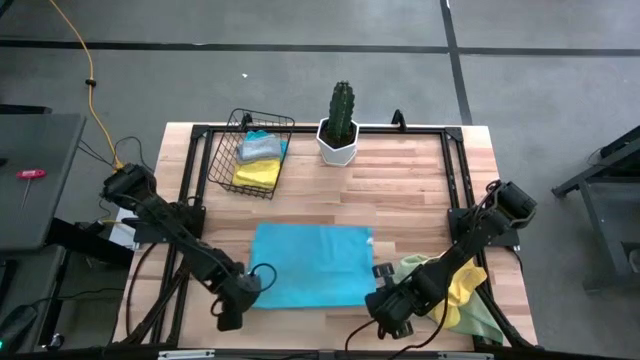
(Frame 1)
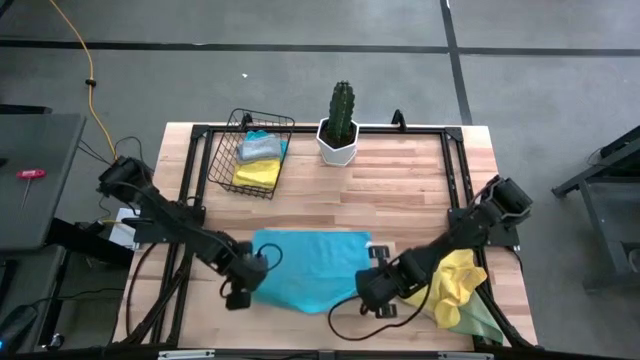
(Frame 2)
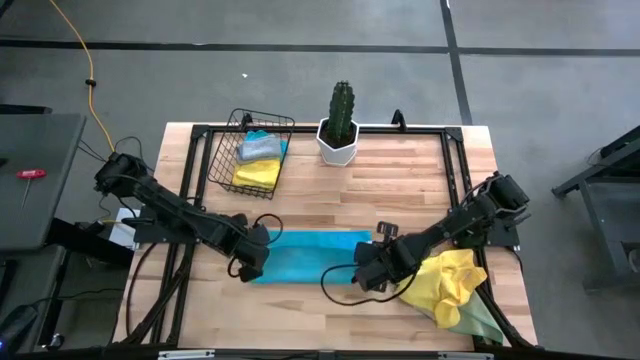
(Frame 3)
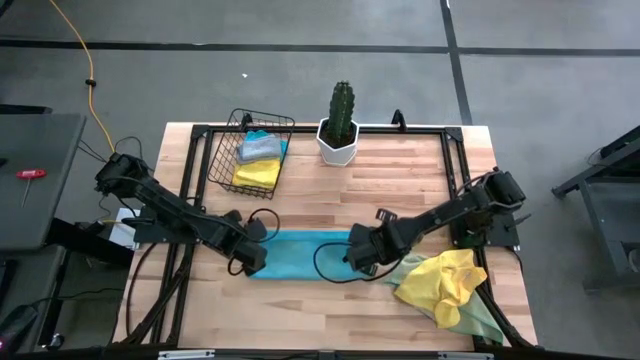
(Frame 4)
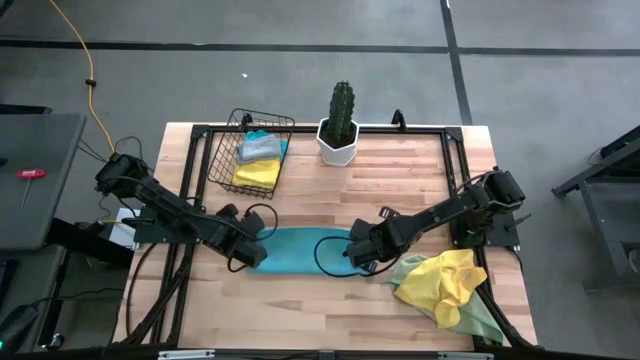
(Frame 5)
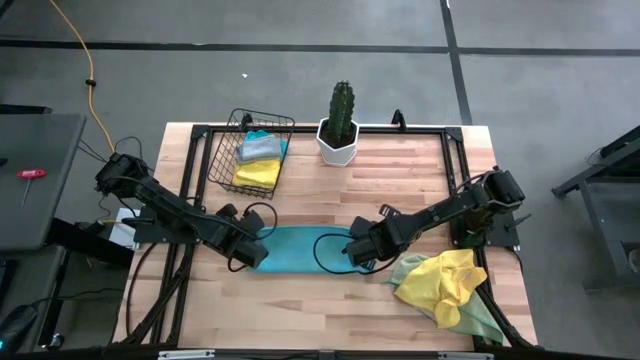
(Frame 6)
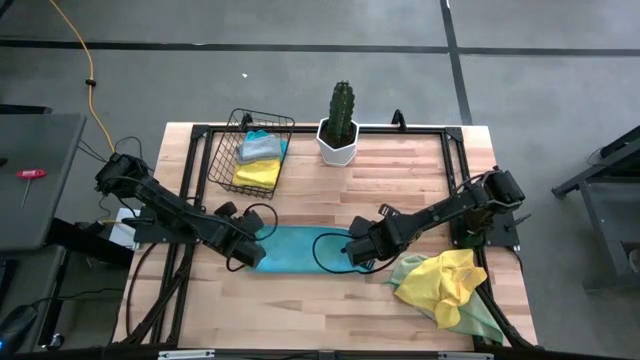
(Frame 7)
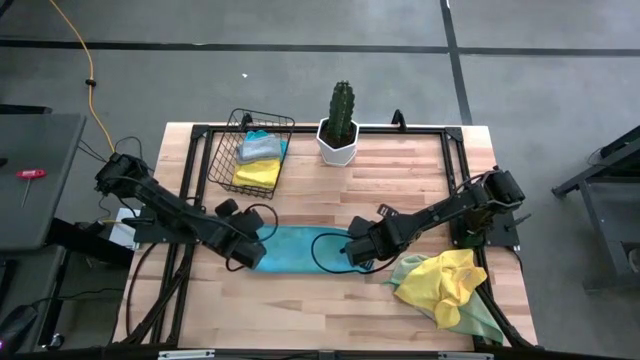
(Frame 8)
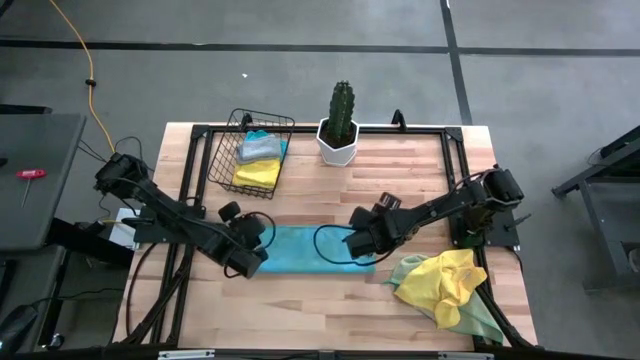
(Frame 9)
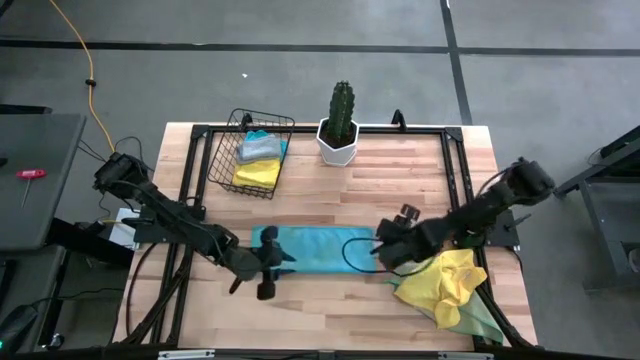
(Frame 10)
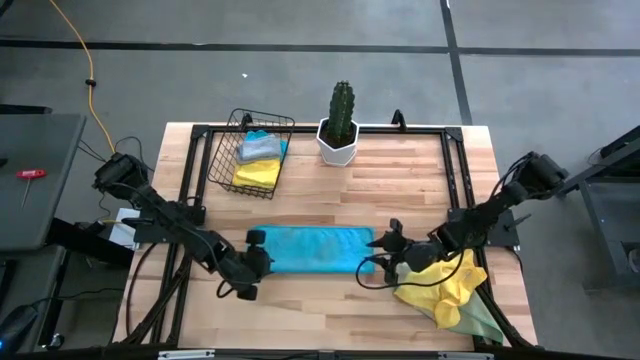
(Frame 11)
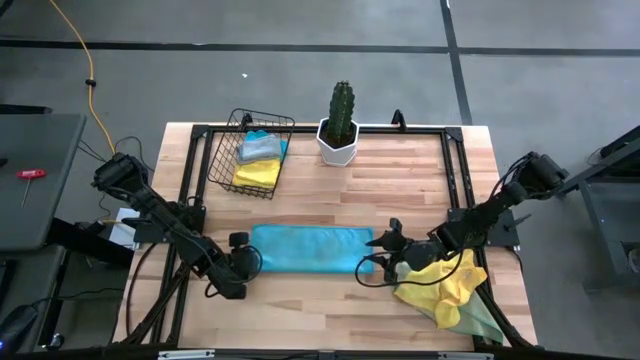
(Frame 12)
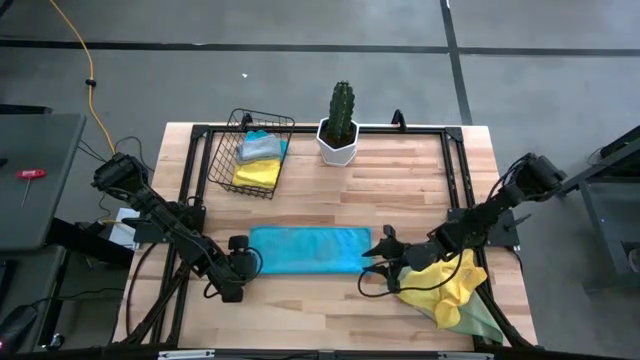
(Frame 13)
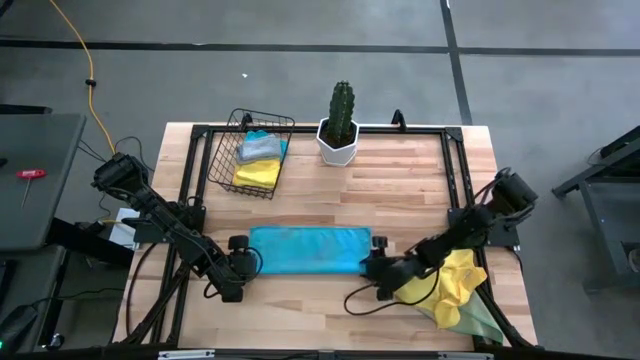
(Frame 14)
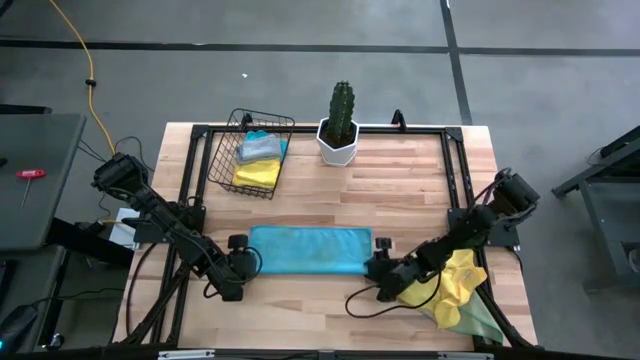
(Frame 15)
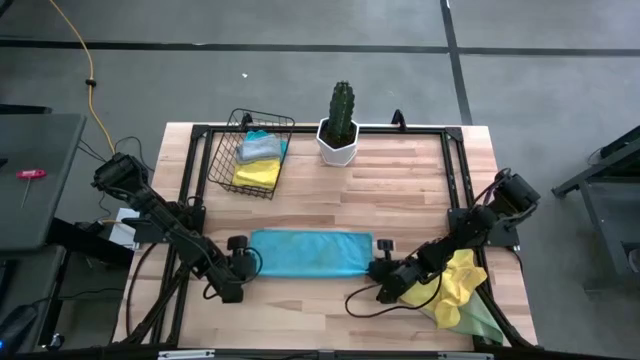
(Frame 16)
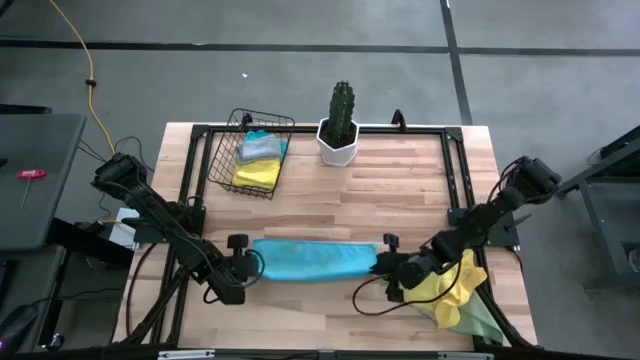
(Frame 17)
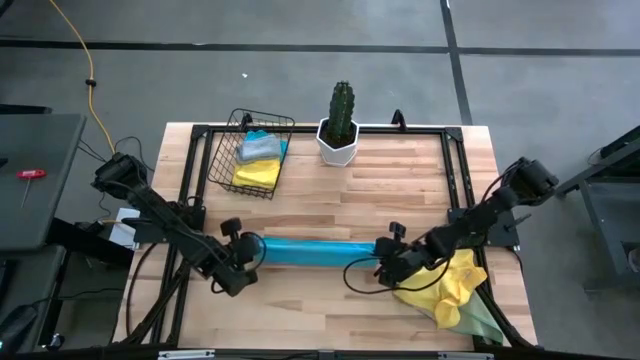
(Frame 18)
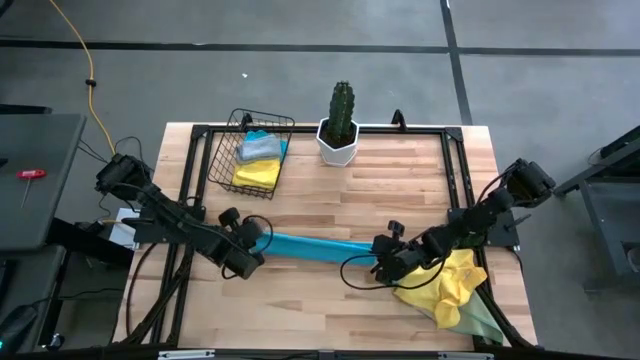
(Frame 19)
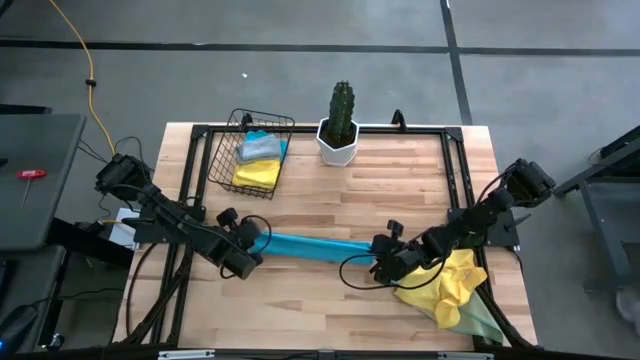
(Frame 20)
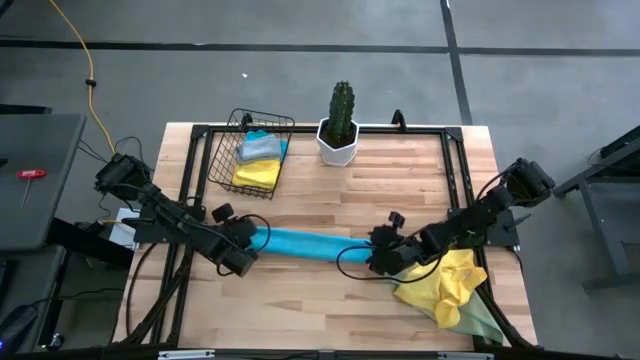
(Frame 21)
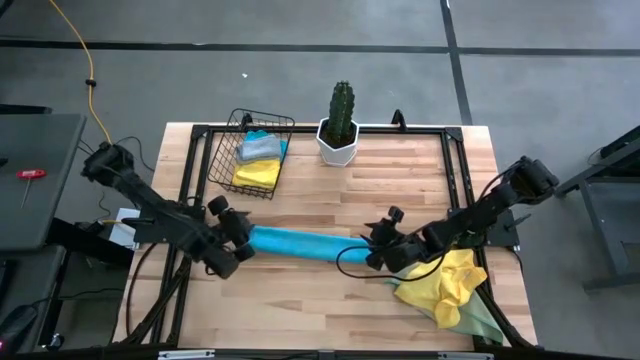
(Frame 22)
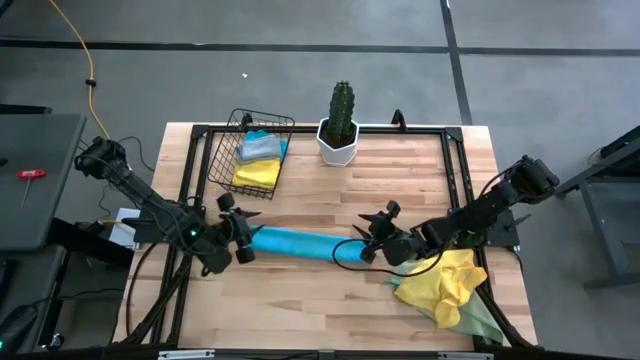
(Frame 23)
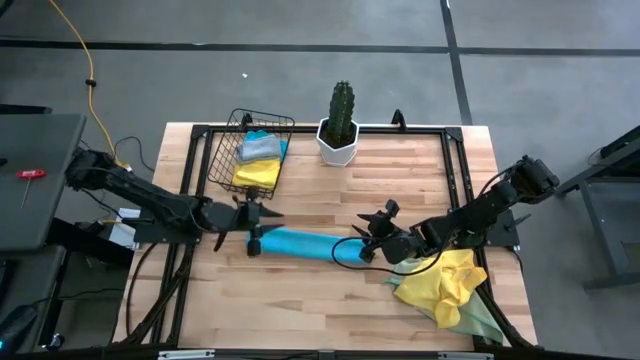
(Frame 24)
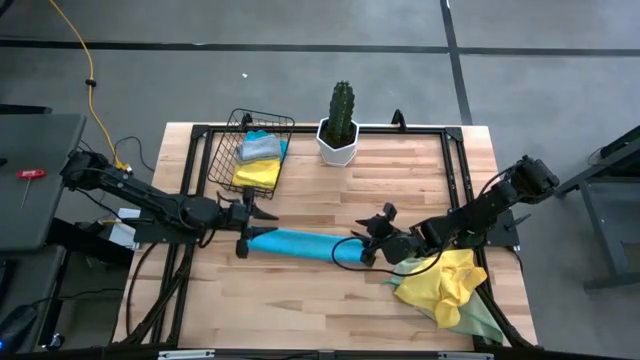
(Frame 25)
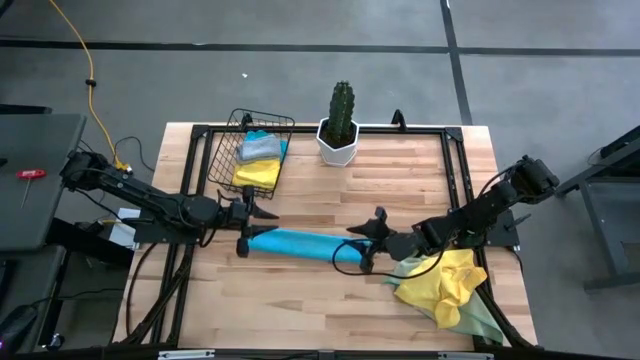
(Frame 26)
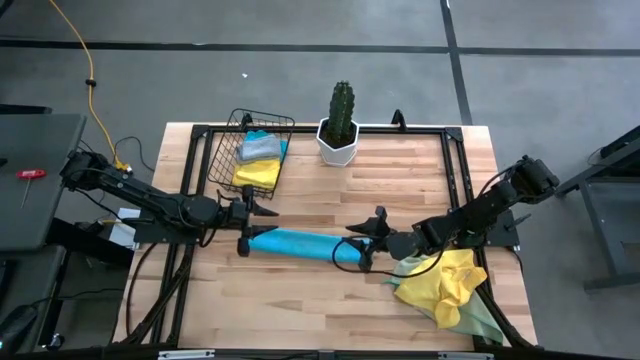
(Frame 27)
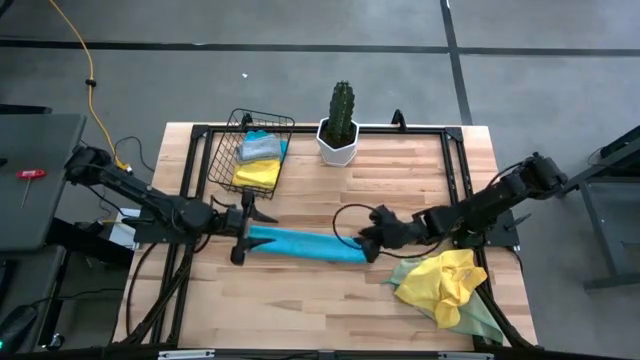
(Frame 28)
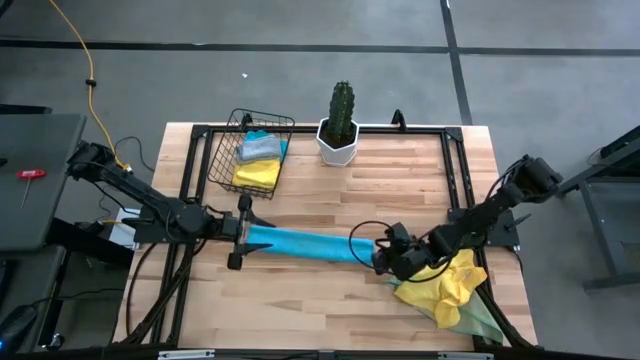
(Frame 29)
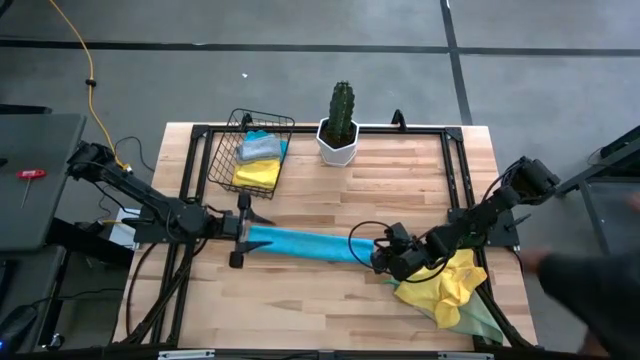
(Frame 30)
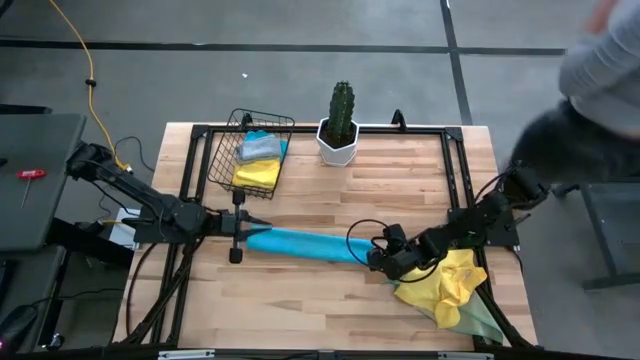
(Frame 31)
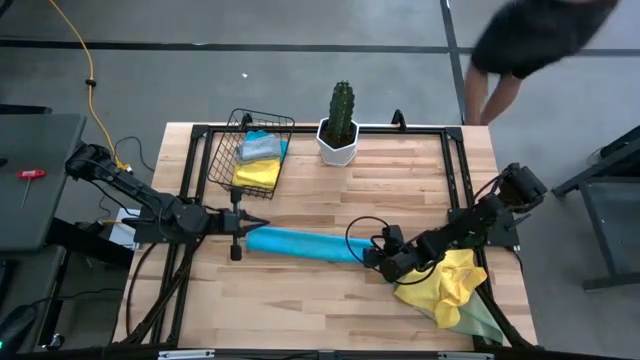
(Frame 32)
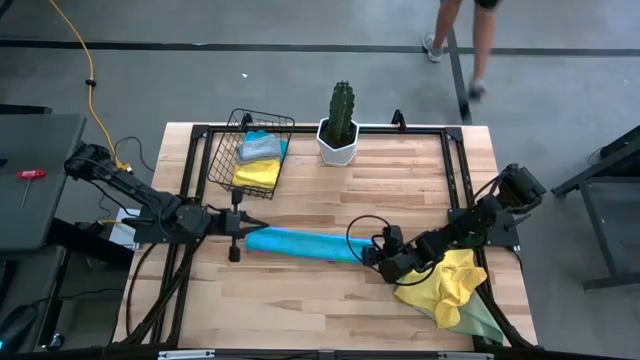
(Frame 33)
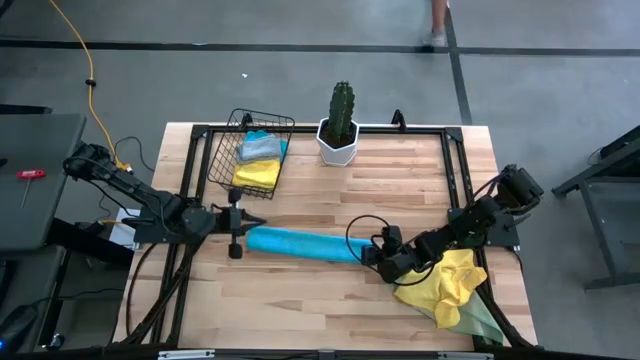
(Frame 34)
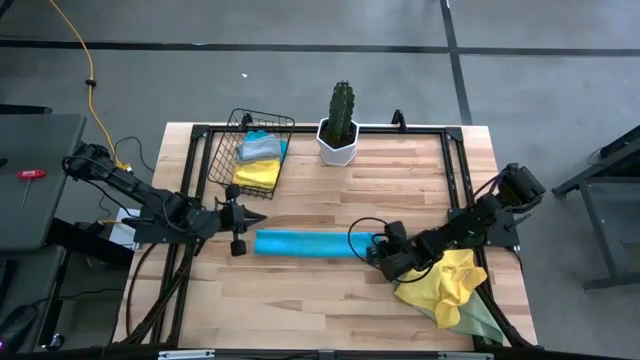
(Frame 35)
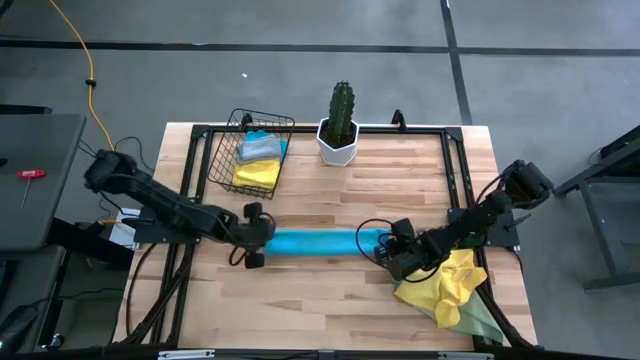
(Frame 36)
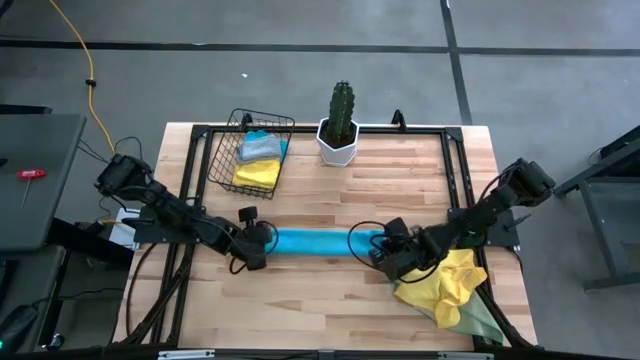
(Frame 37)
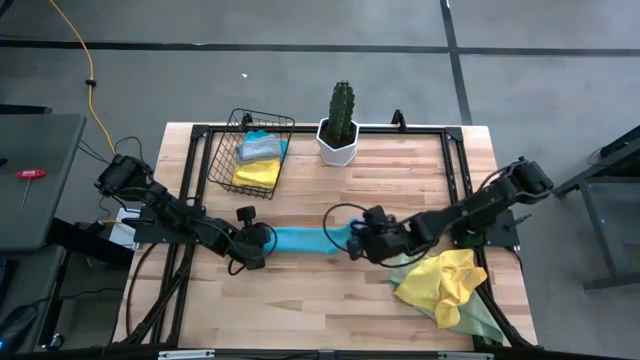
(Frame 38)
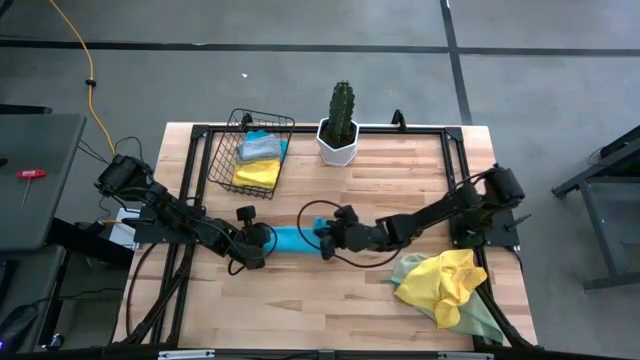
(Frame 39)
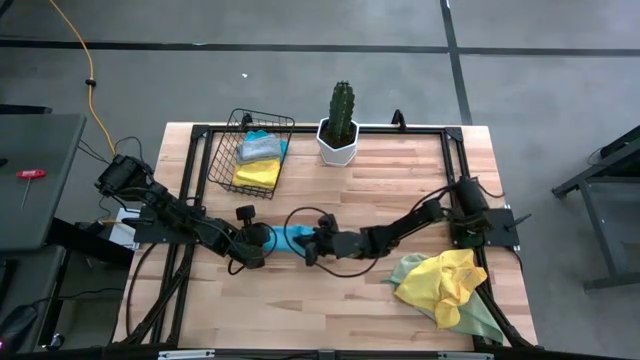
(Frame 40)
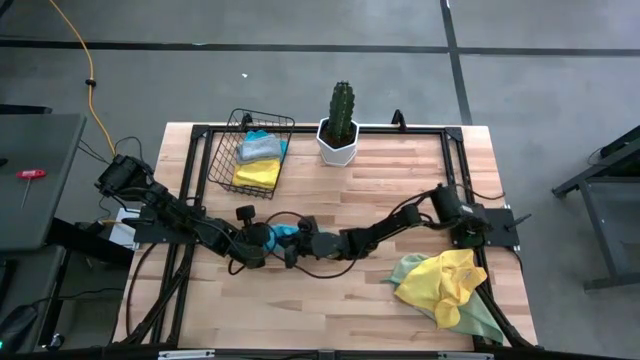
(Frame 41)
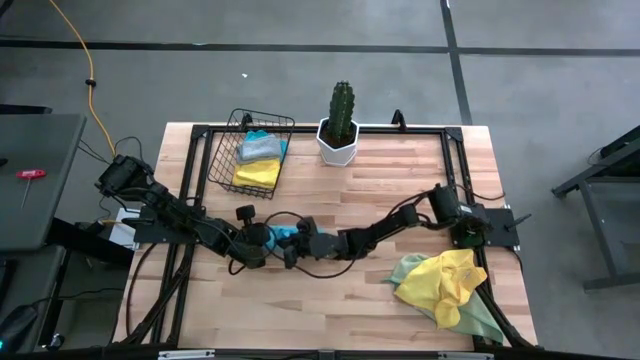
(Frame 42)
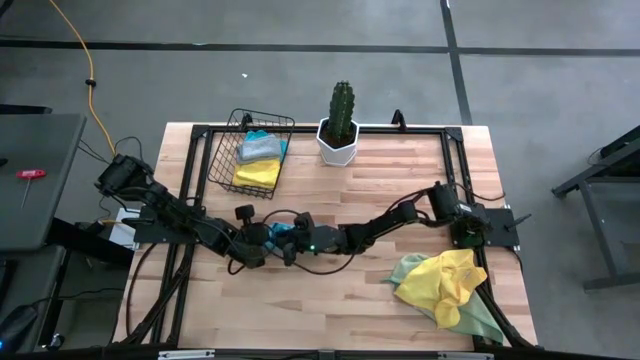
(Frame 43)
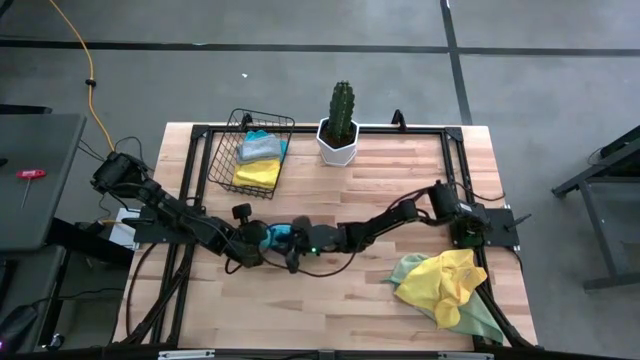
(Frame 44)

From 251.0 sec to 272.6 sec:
Task: Fold microfiber towels
Fold the blue microfiber towel on the table
